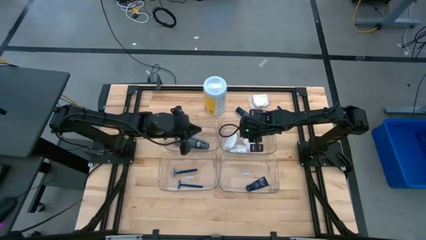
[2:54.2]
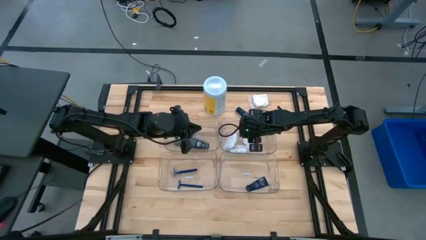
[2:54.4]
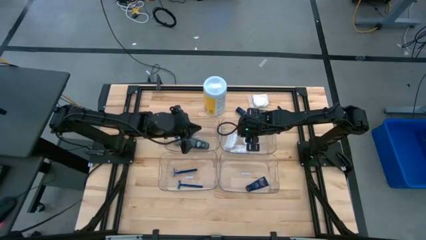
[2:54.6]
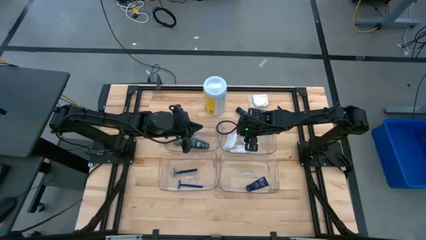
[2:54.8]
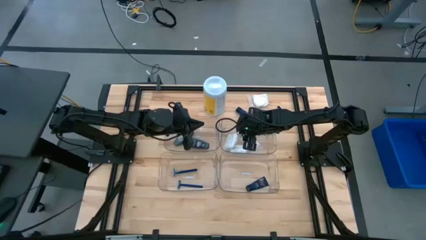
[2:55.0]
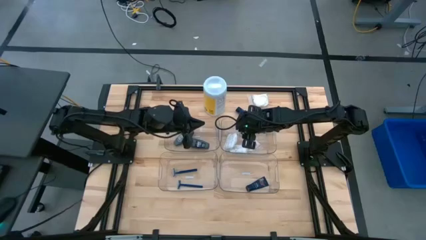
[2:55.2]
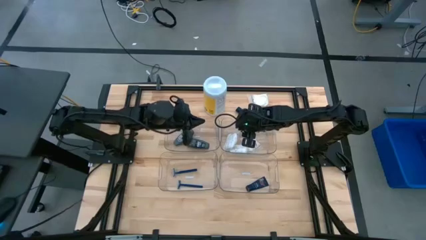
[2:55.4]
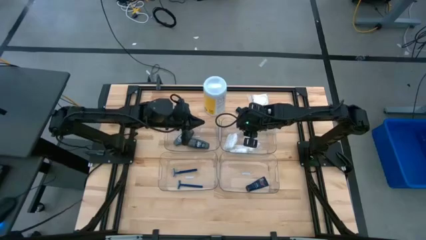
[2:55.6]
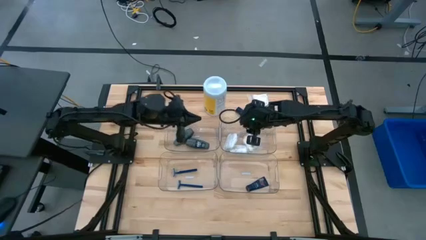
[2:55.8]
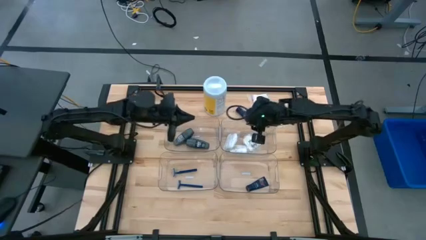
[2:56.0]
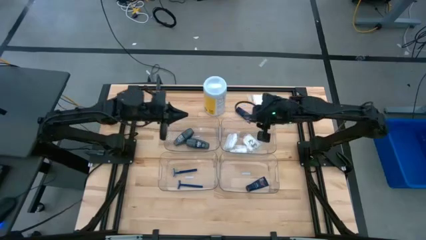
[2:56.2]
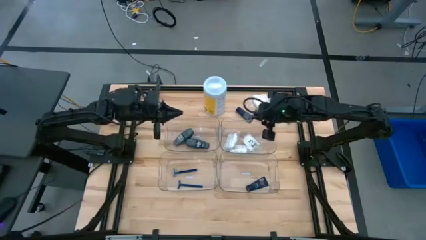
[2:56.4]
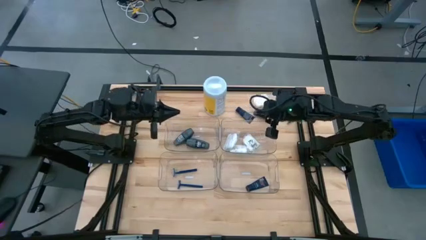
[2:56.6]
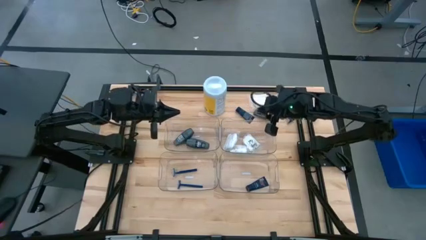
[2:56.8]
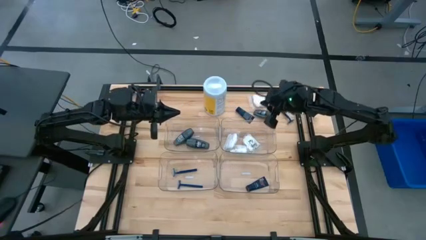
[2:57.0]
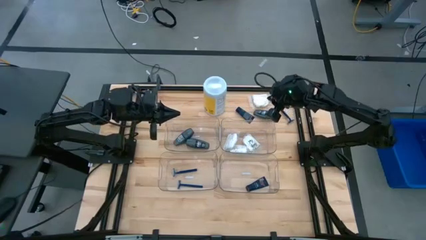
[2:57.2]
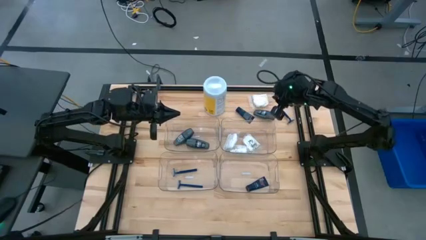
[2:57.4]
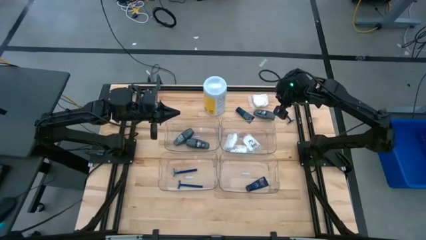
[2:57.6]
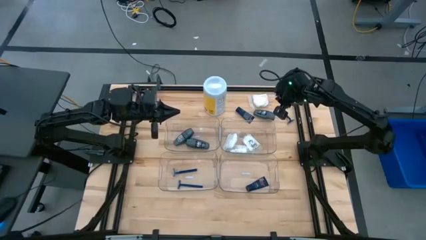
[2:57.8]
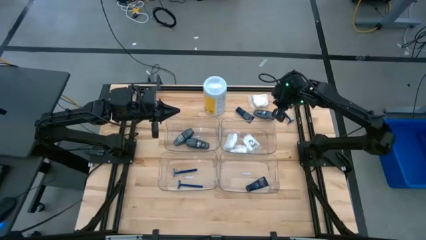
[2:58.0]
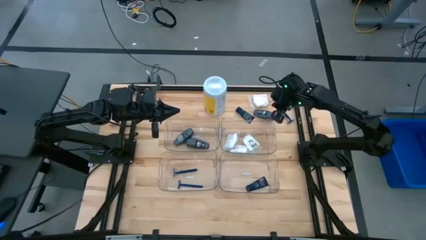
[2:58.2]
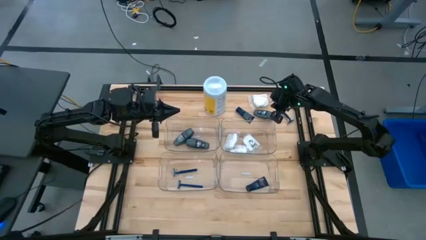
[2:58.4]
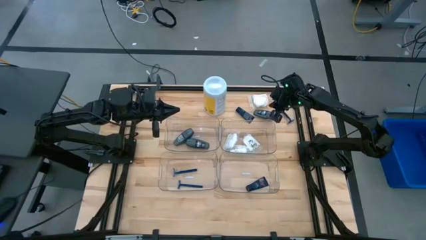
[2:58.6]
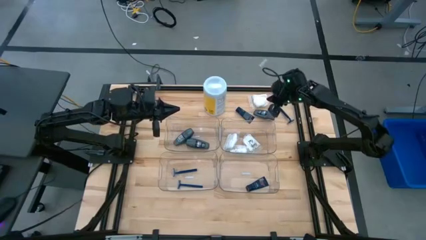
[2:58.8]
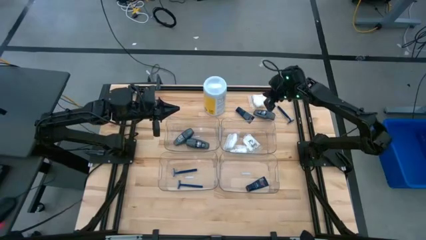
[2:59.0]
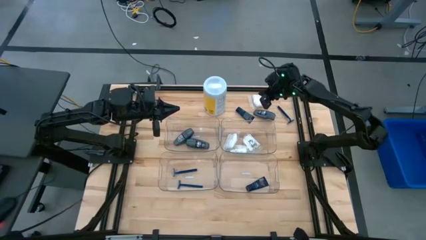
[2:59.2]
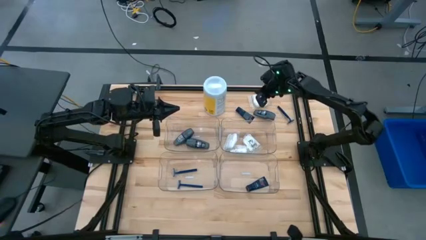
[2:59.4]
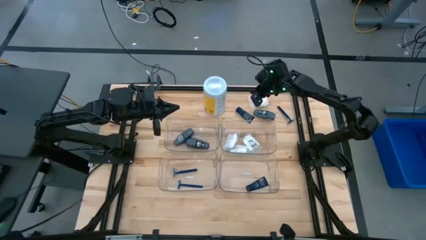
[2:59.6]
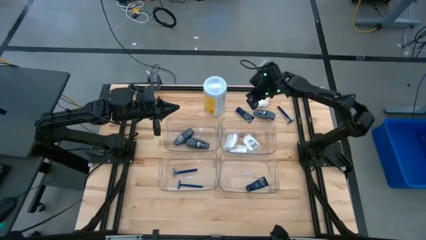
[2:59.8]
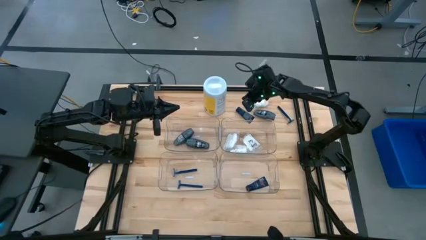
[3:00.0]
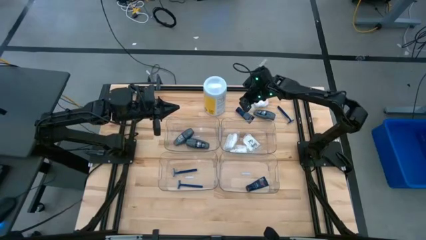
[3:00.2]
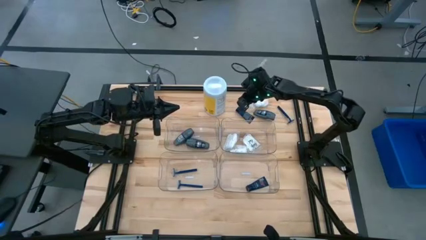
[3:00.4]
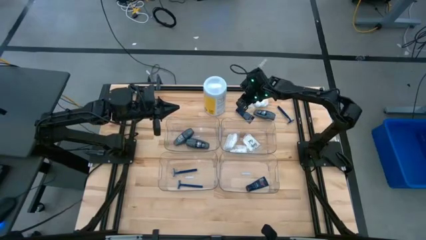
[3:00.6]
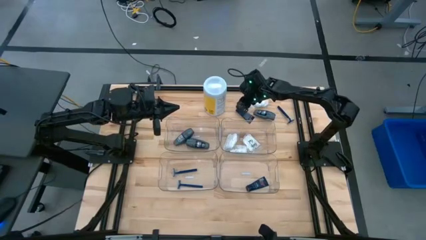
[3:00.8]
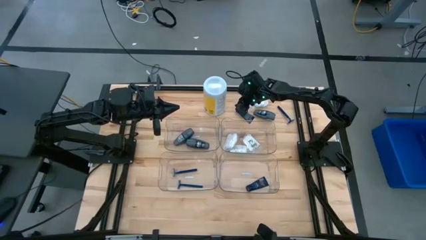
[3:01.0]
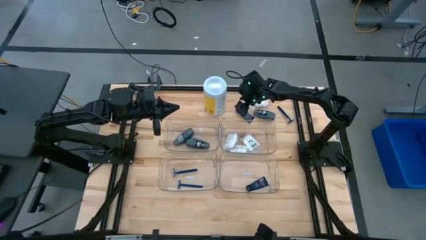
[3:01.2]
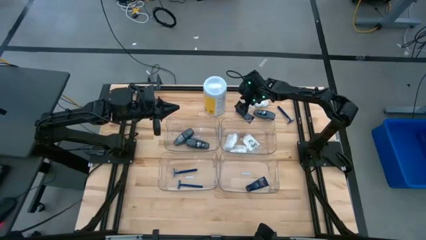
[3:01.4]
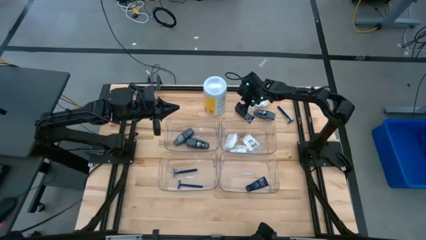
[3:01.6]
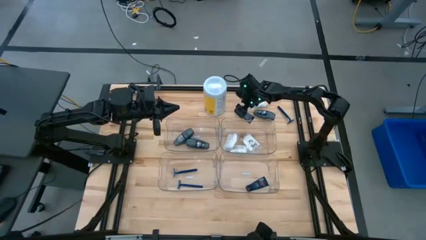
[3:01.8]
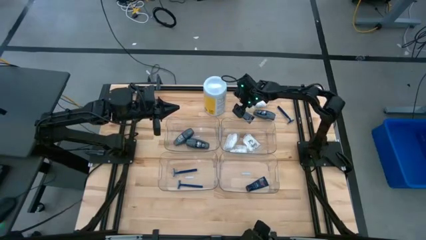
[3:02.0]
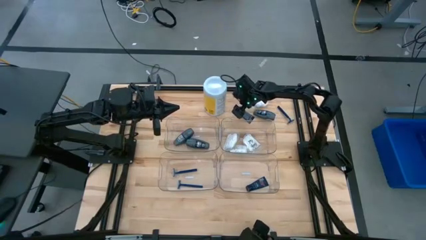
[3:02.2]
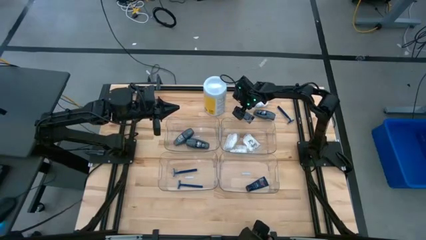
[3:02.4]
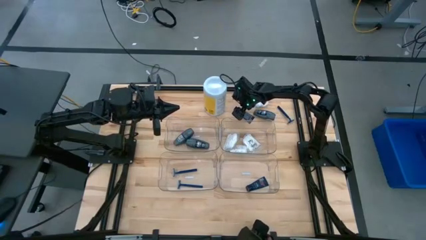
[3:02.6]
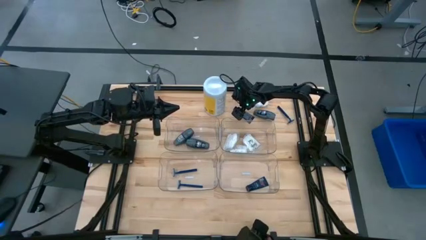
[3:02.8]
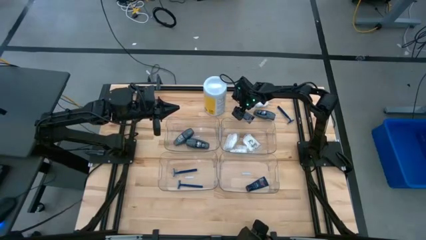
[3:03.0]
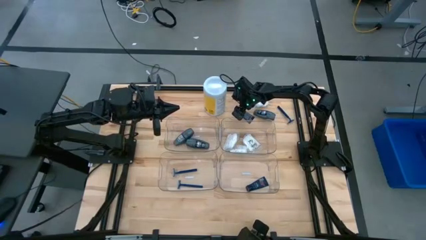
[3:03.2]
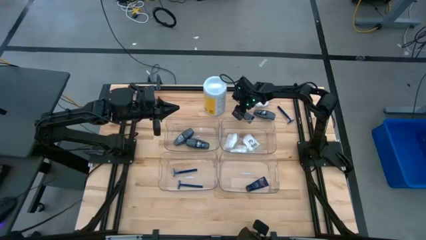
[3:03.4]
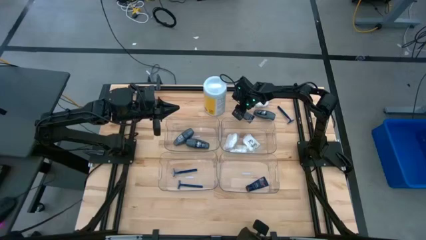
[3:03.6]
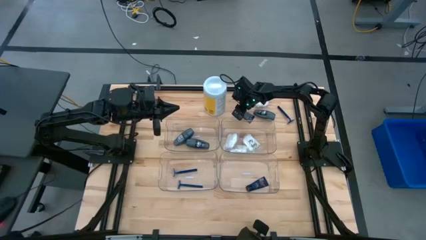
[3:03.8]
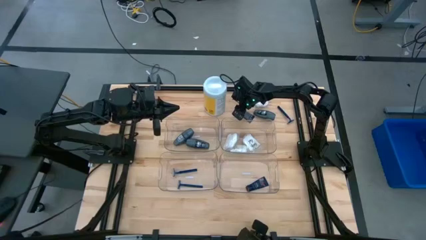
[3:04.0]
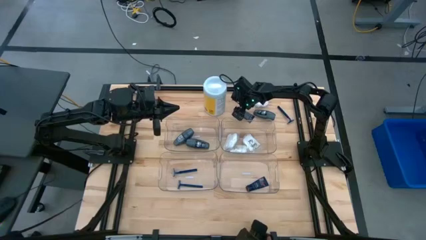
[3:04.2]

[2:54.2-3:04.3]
Task: Pick & Place Travel size toiletries
Put the blue shaver cream into the bottom right transparent bin

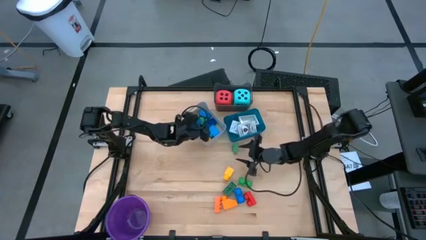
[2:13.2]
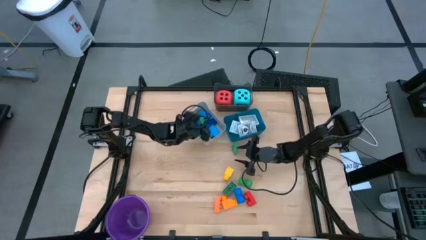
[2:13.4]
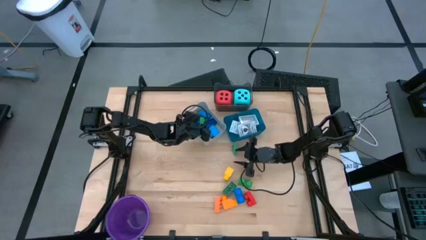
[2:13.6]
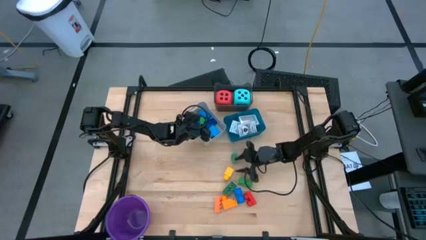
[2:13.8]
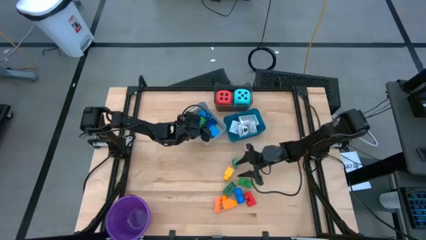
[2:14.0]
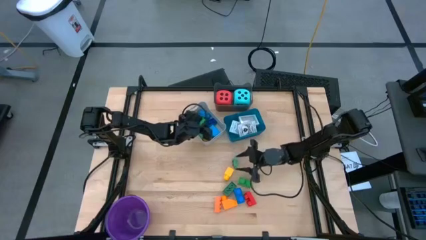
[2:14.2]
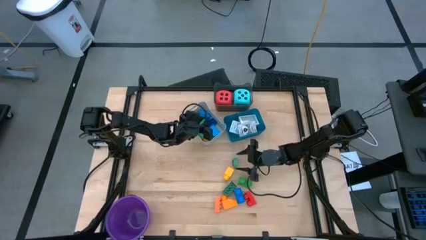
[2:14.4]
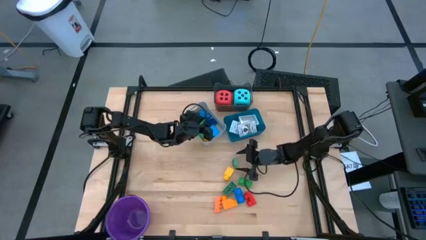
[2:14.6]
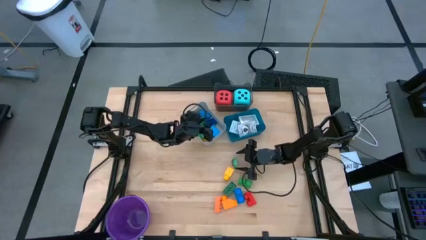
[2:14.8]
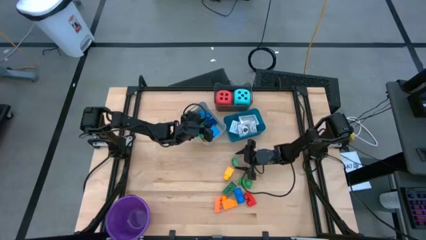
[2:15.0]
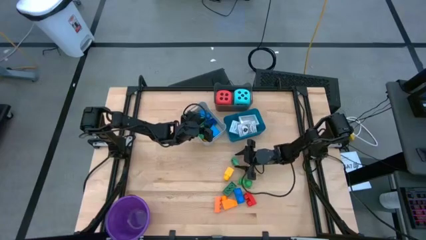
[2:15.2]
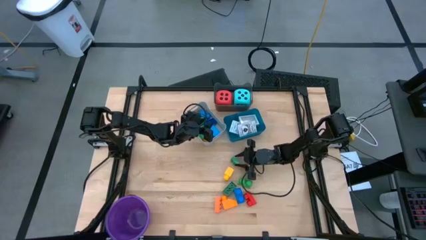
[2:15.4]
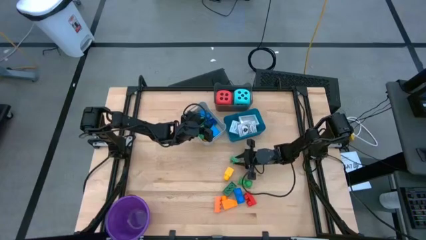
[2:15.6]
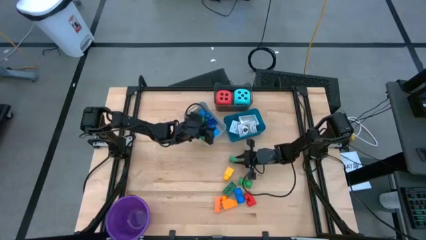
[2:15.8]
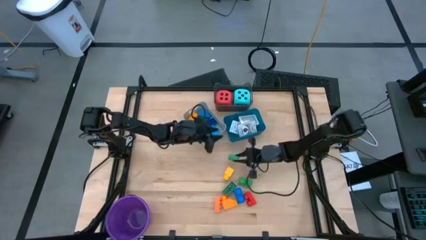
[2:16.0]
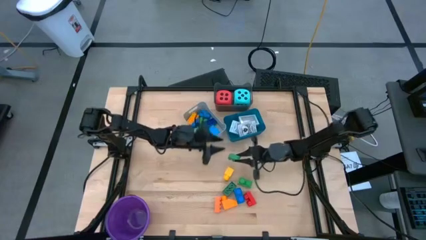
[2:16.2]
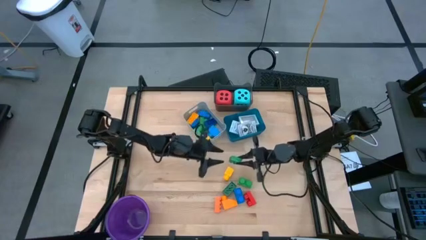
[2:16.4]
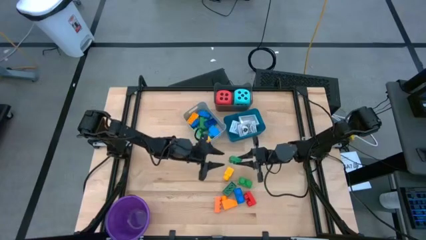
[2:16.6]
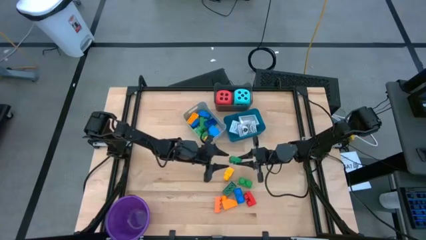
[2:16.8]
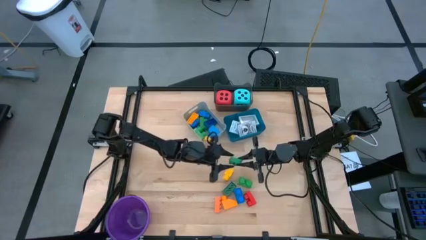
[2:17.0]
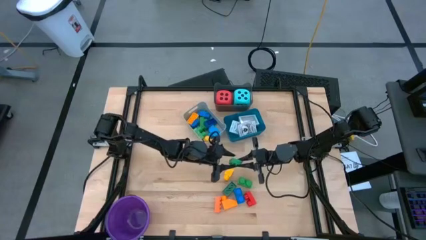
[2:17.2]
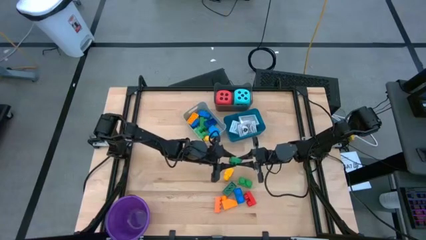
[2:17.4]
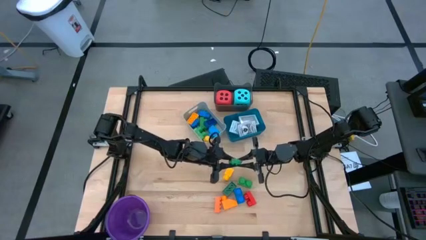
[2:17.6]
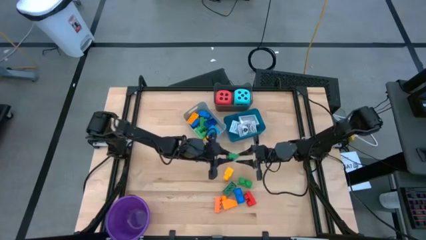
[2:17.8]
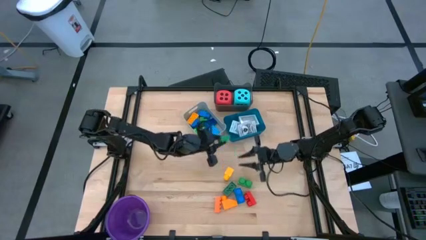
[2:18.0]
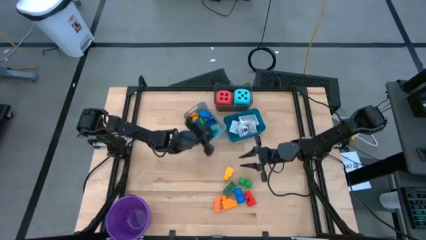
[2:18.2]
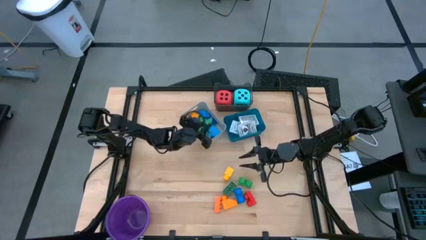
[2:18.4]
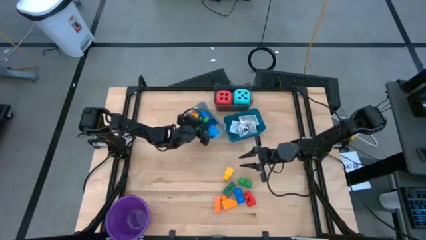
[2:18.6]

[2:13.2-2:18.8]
Task: Pick & Place Toys
Put the green game piece into the gray bin
